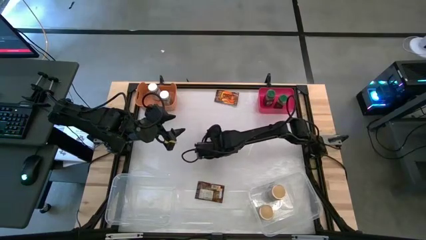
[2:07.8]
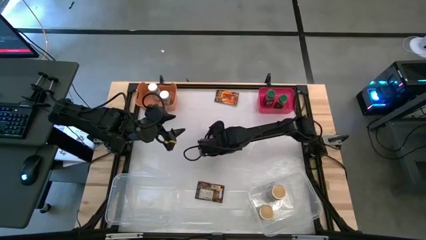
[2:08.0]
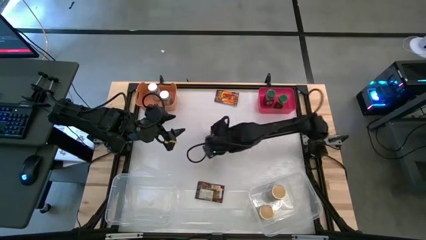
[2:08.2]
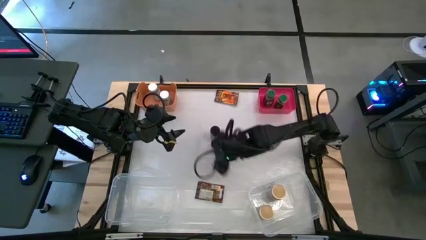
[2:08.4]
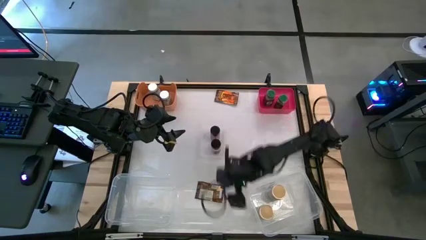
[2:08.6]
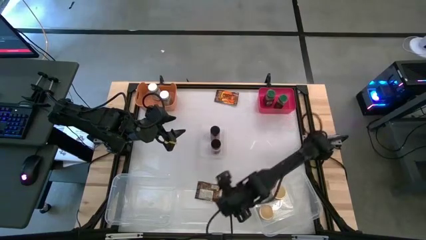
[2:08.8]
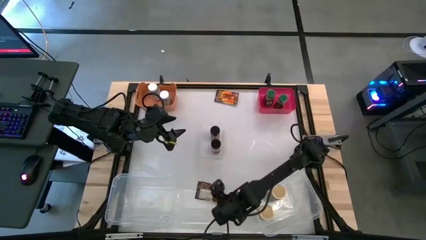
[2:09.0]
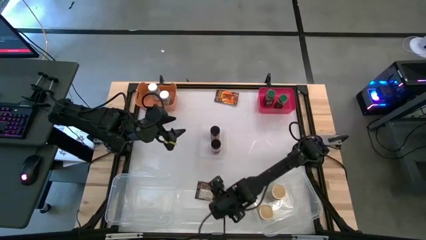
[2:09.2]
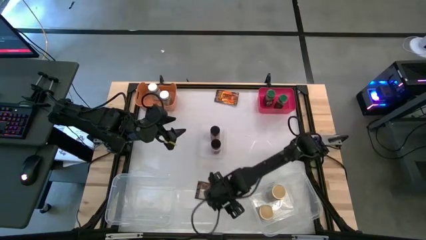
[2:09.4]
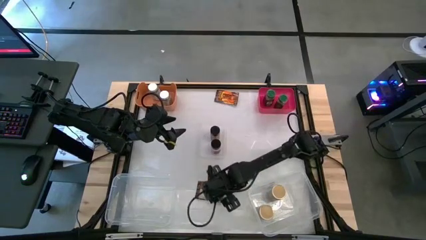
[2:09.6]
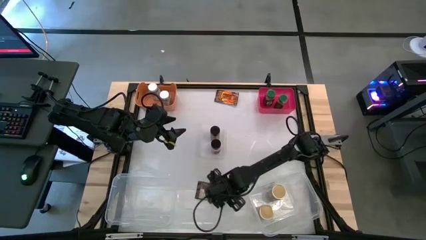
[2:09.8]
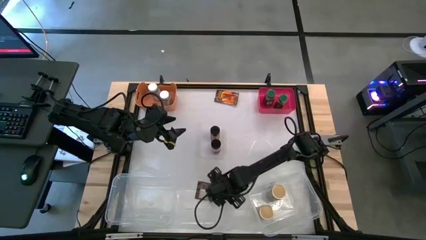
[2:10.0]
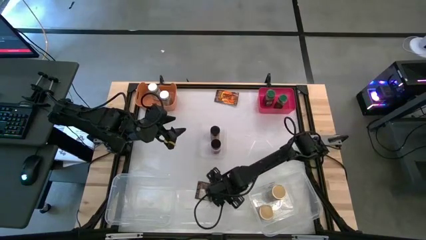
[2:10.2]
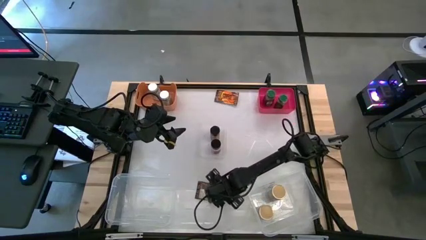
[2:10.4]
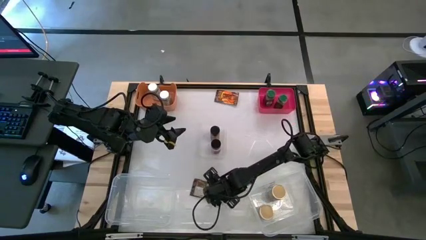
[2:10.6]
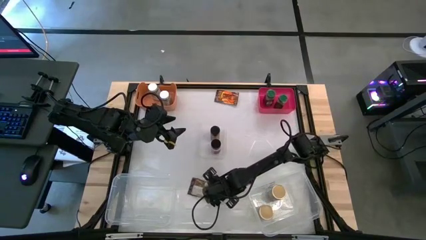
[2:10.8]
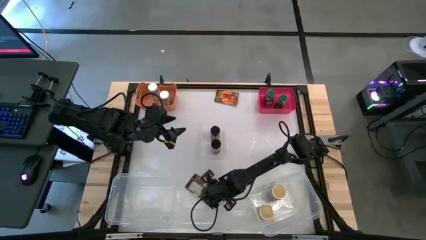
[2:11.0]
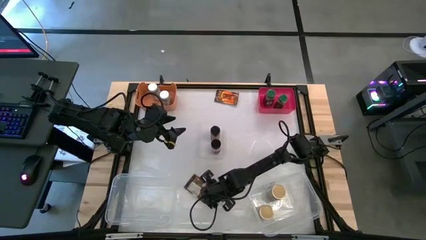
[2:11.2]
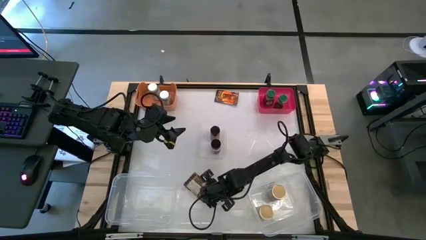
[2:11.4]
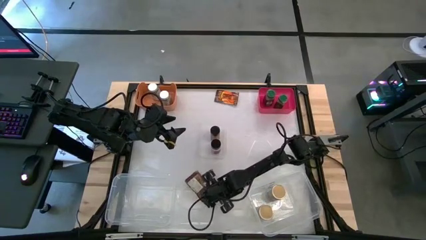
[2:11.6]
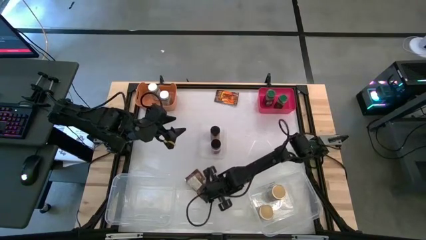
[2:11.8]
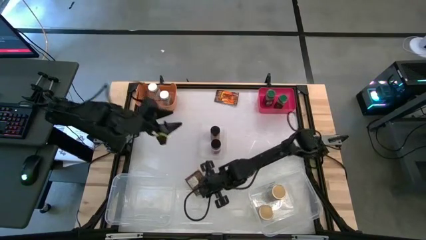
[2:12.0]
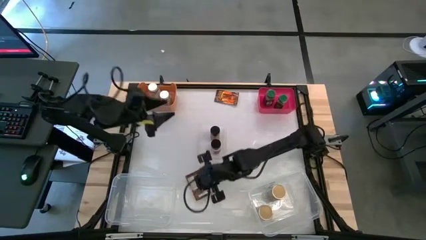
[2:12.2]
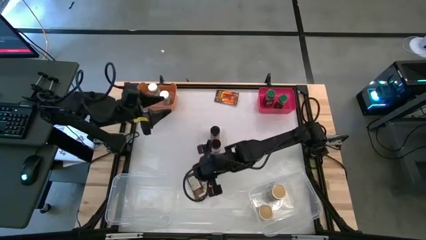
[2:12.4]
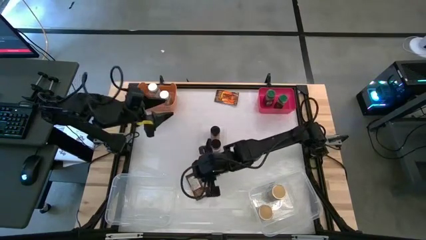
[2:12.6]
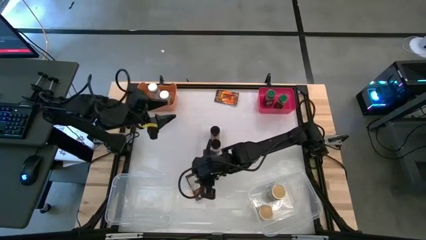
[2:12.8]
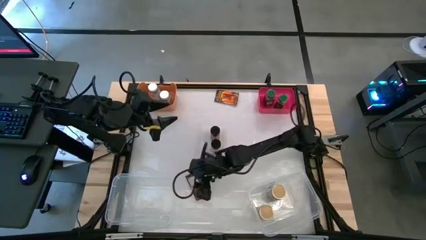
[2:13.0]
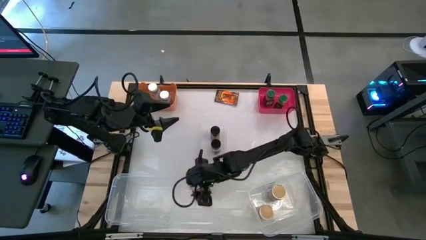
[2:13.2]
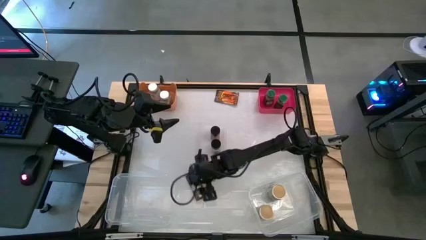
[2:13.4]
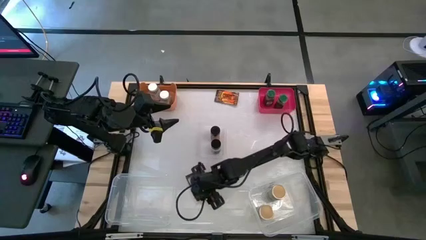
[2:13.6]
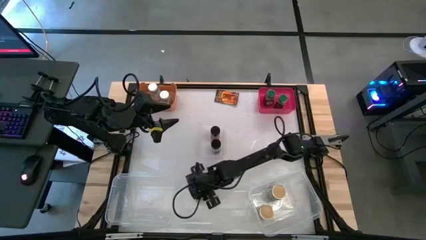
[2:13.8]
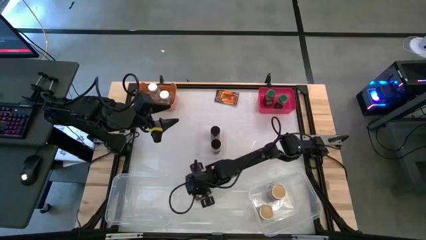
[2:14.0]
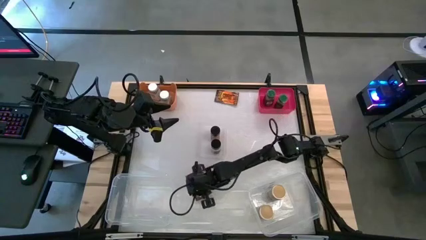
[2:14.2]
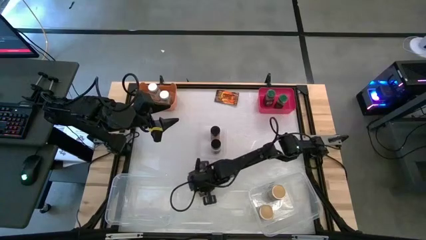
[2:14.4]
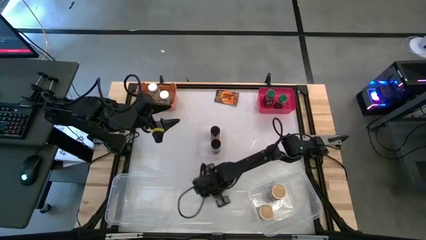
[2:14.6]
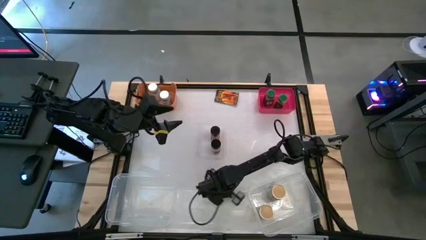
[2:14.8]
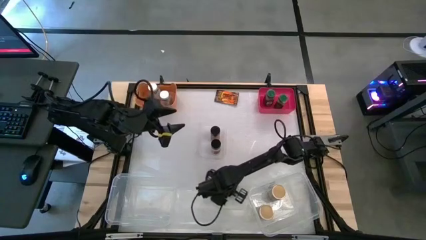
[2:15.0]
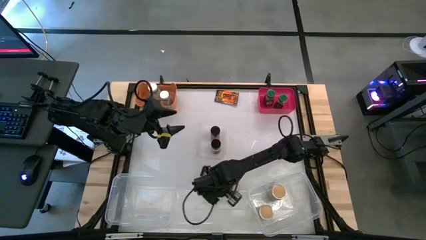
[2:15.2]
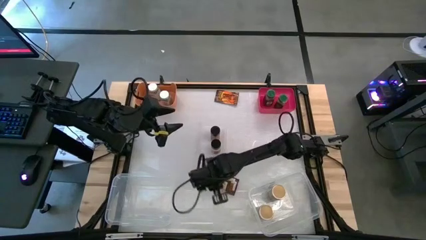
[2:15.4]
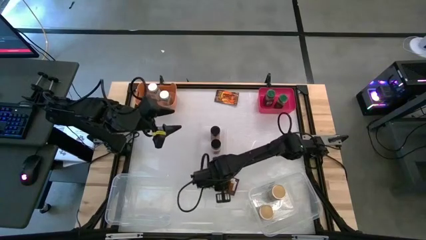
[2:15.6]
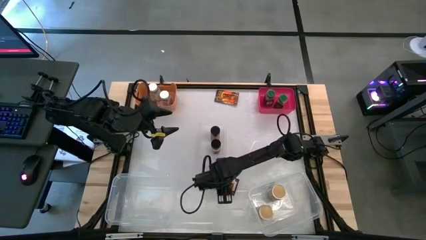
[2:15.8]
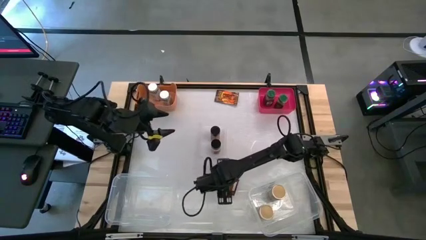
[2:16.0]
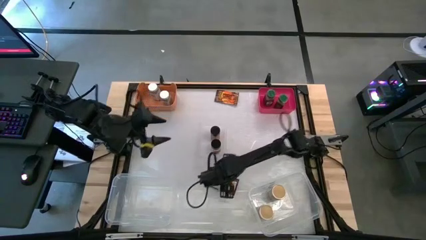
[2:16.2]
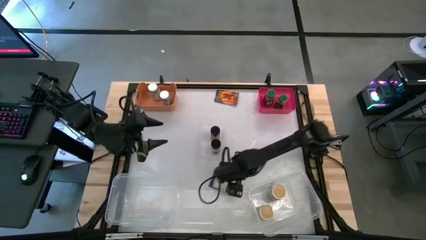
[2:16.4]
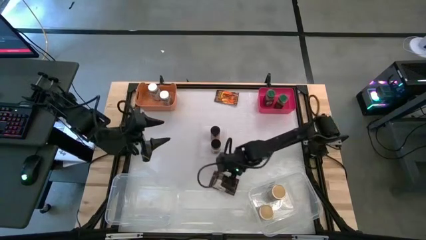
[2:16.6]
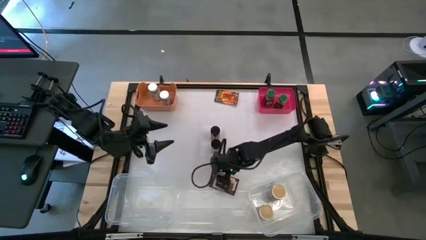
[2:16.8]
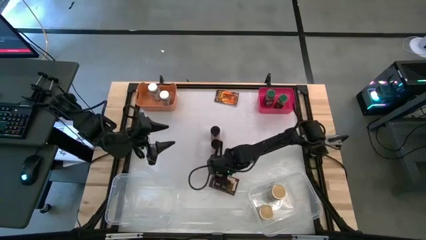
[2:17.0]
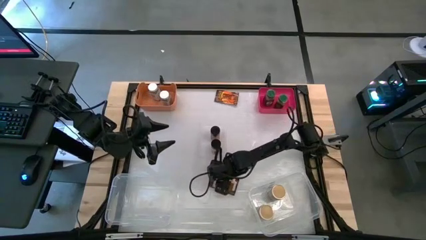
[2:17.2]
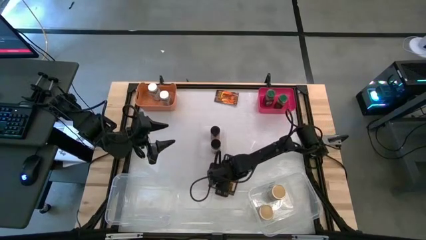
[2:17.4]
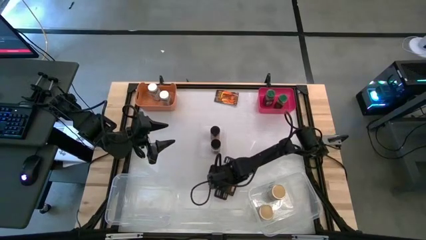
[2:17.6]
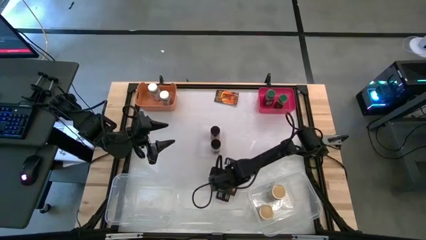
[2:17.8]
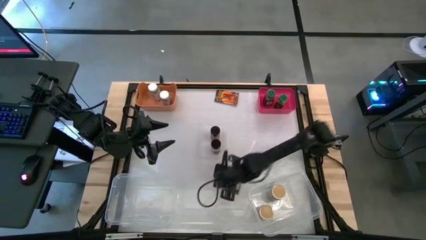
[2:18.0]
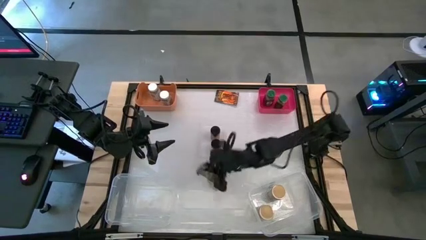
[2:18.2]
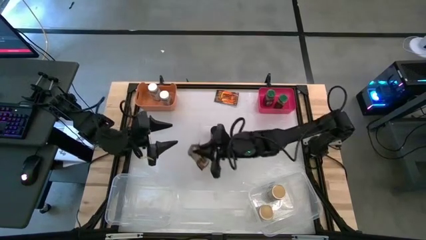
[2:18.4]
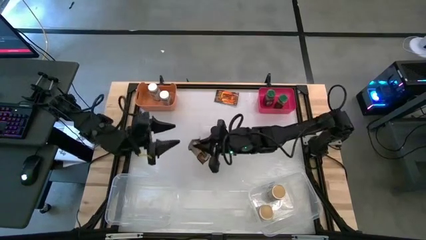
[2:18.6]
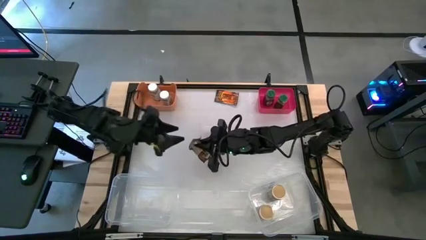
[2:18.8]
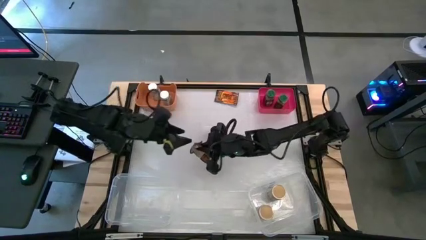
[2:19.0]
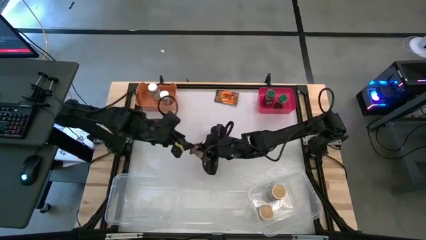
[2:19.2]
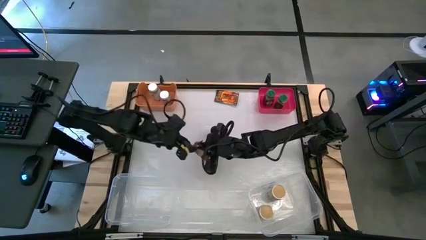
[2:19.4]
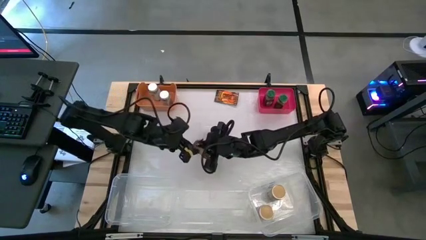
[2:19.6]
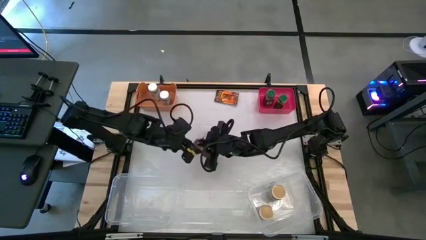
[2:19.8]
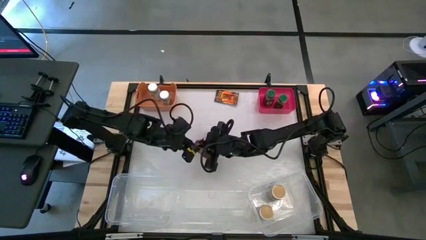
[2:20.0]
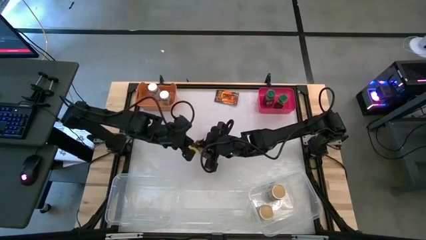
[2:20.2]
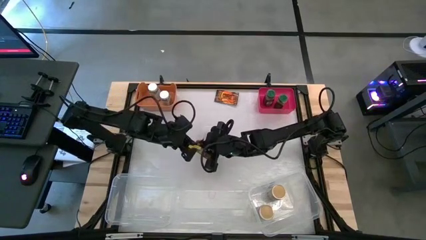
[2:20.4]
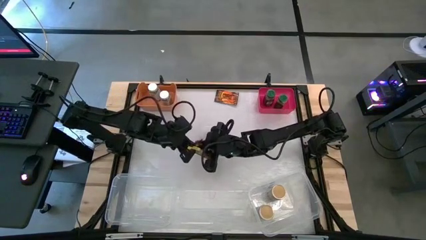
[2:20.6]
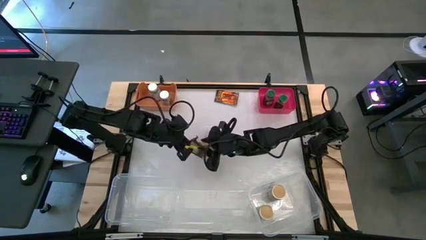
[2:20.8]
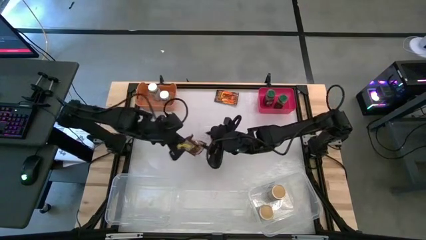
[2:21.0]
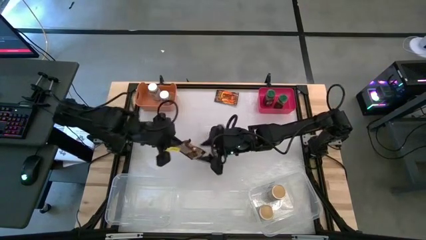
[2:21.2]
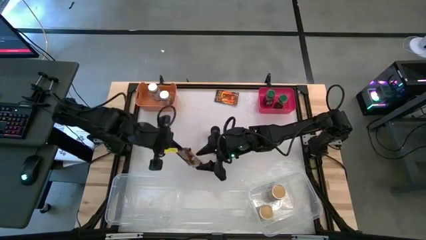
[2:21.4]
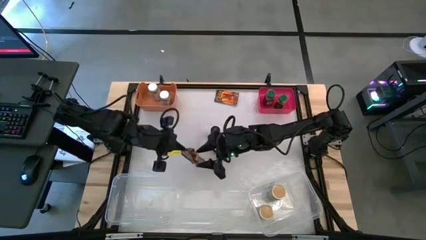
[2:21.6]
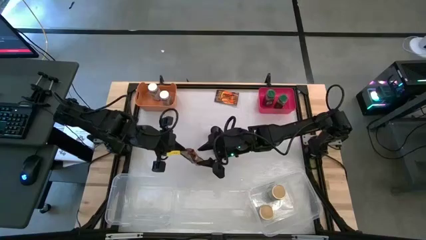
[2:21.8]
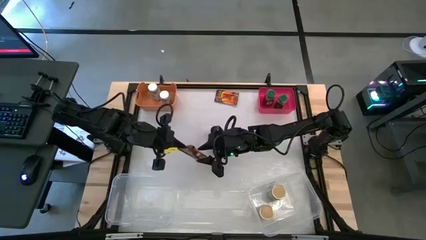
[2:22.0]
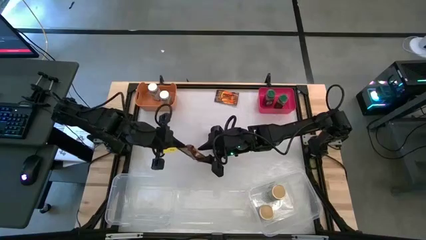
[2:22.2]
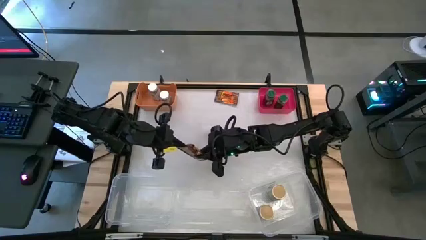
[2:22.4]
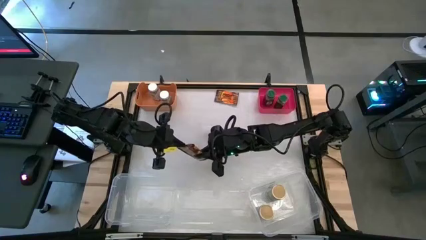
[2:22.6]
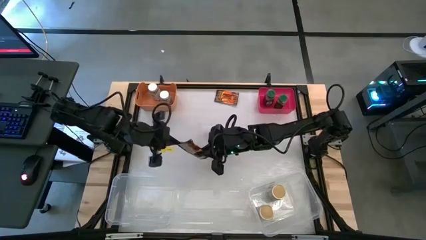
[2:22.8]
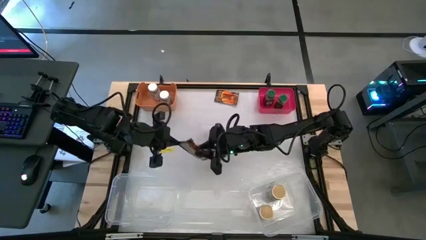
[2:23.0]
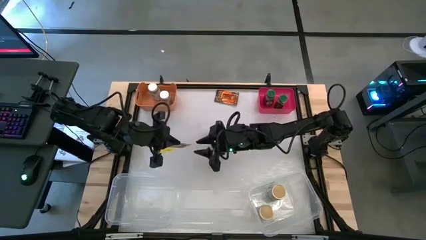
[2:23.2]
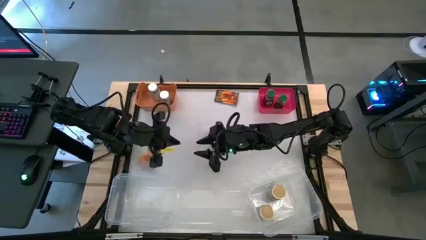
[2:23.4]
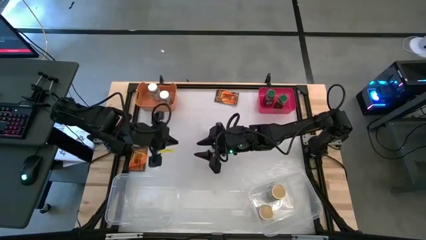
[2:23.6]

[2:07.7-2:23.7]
Task: Sort spices by type
Put the bottom orange seasoning bag into the left transparent bin
